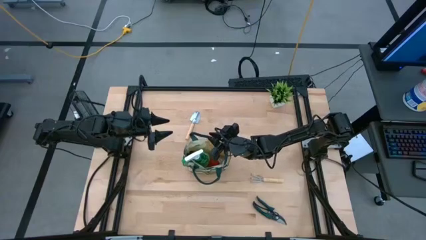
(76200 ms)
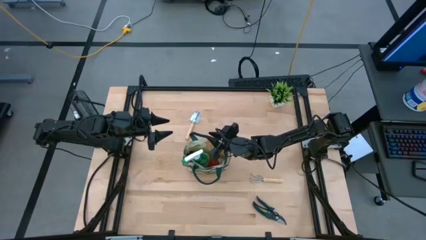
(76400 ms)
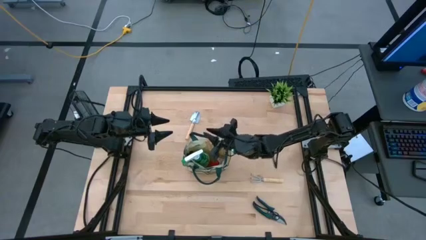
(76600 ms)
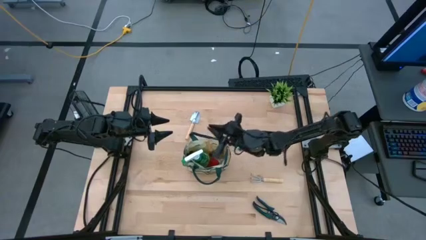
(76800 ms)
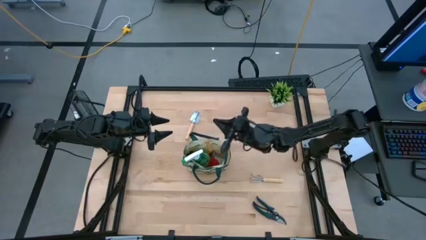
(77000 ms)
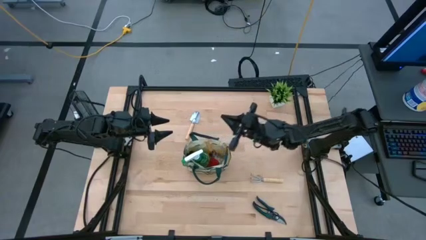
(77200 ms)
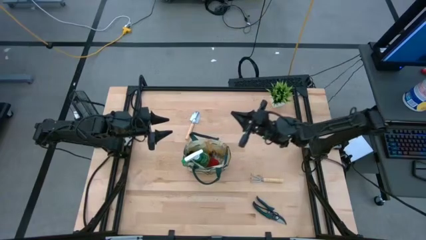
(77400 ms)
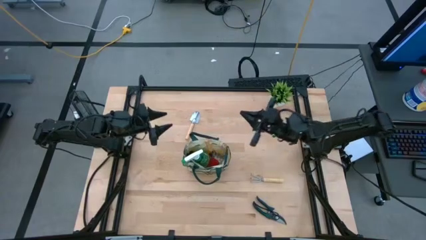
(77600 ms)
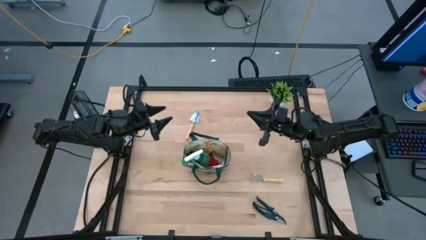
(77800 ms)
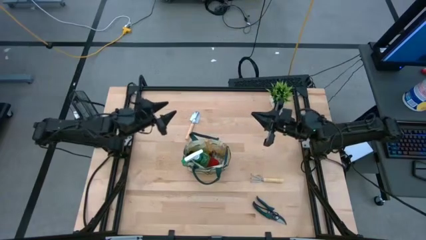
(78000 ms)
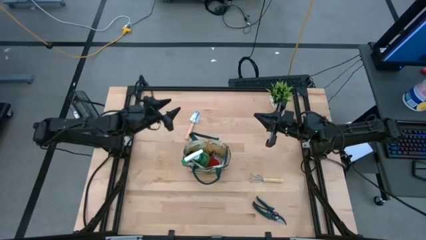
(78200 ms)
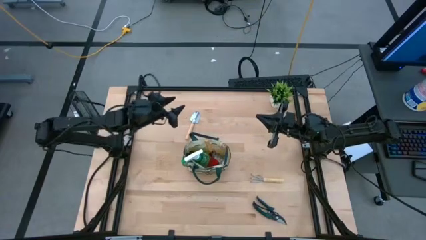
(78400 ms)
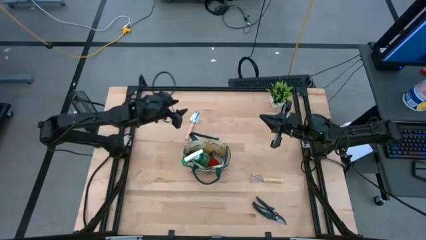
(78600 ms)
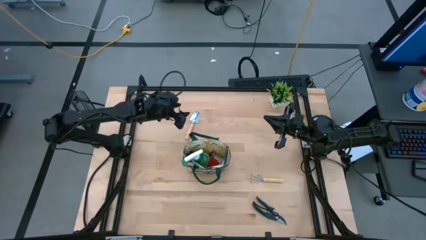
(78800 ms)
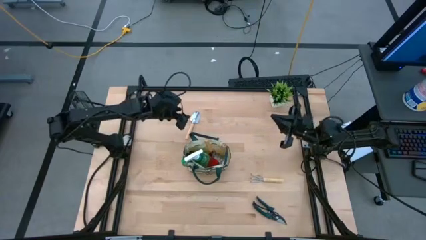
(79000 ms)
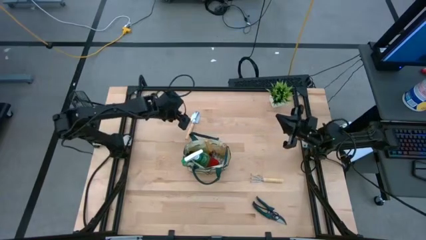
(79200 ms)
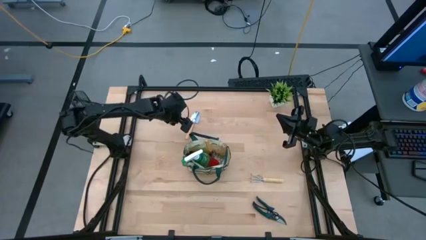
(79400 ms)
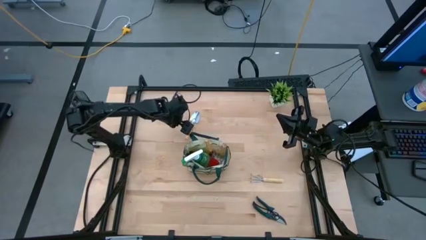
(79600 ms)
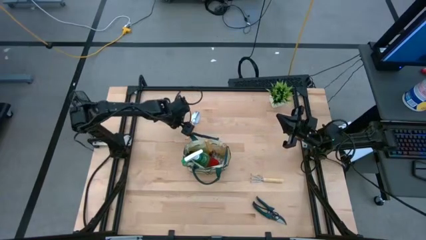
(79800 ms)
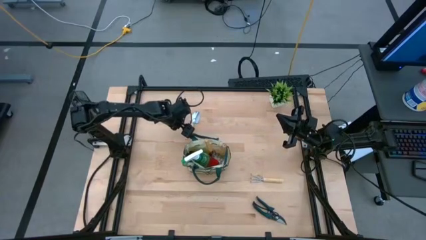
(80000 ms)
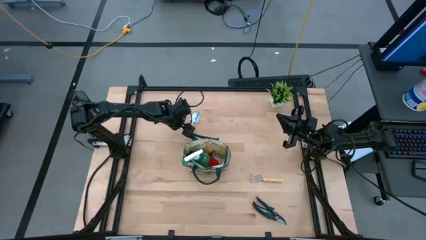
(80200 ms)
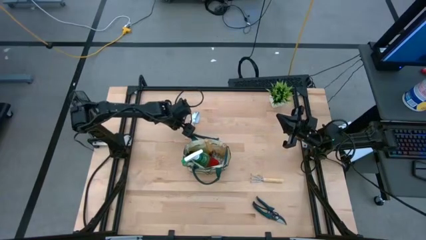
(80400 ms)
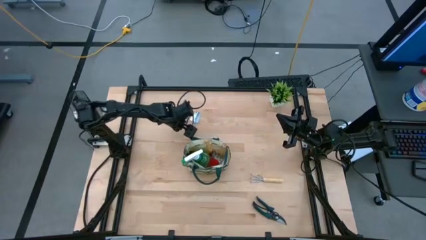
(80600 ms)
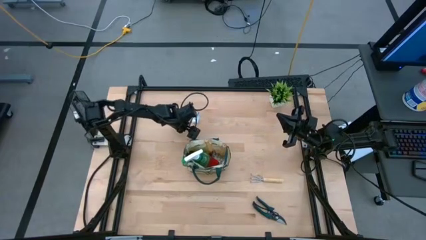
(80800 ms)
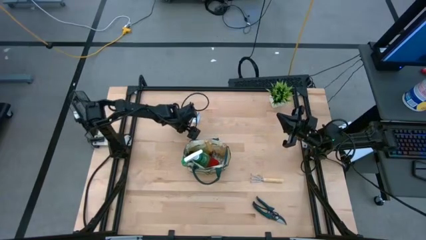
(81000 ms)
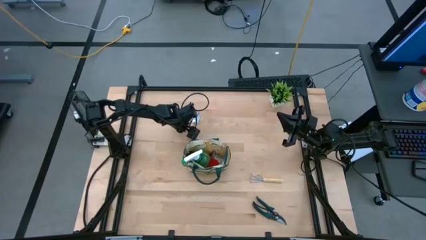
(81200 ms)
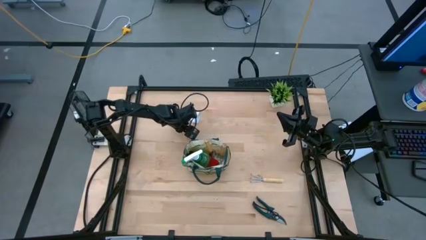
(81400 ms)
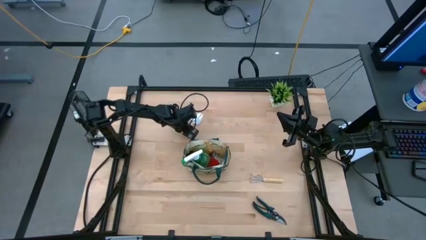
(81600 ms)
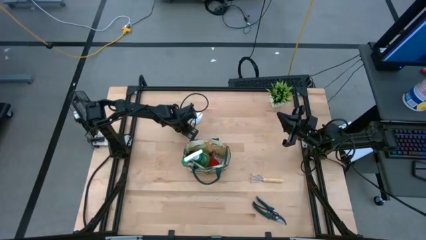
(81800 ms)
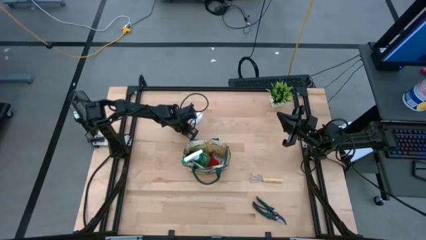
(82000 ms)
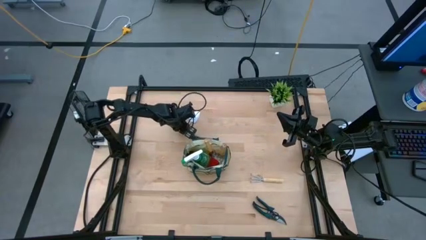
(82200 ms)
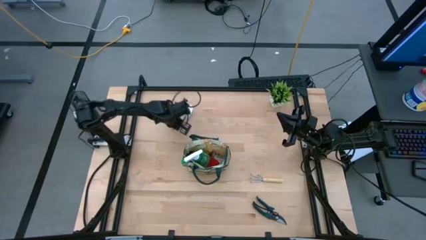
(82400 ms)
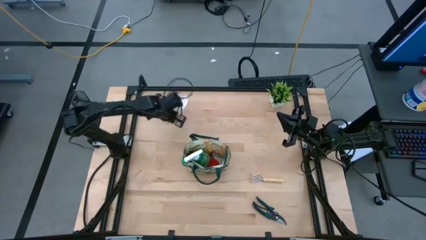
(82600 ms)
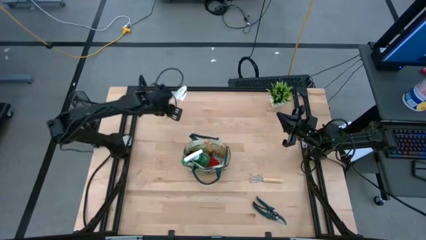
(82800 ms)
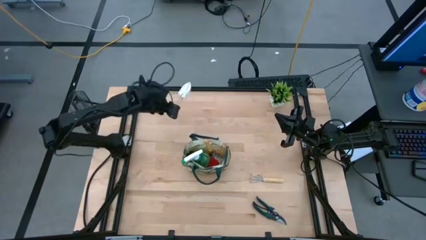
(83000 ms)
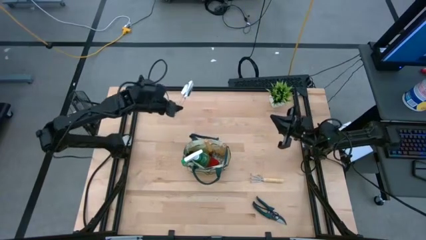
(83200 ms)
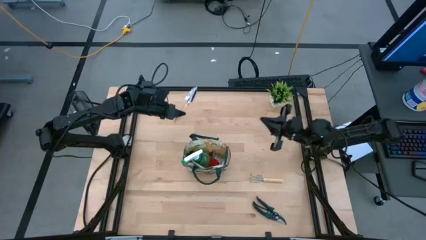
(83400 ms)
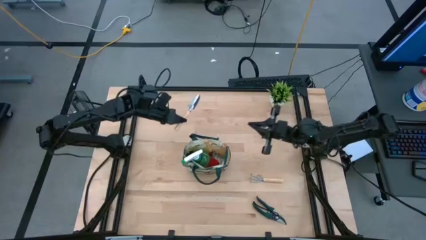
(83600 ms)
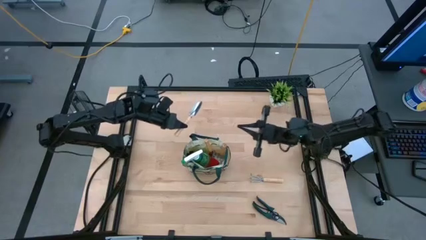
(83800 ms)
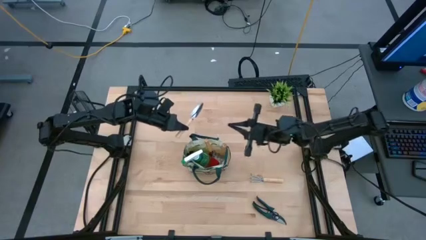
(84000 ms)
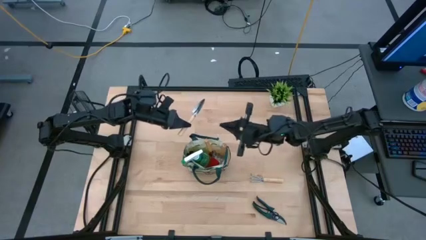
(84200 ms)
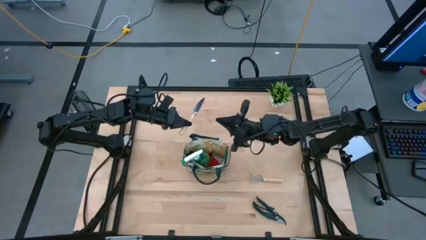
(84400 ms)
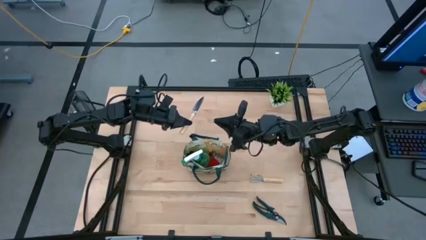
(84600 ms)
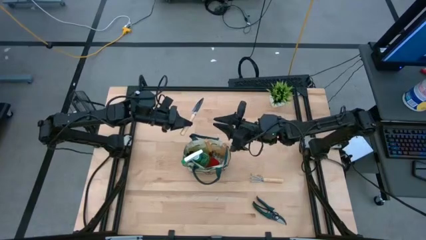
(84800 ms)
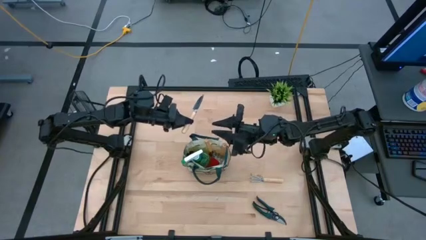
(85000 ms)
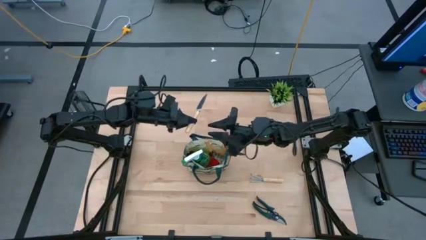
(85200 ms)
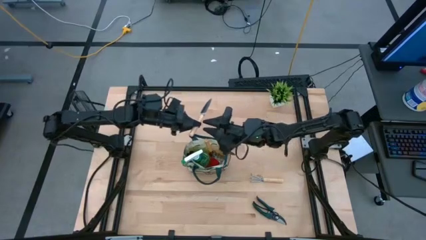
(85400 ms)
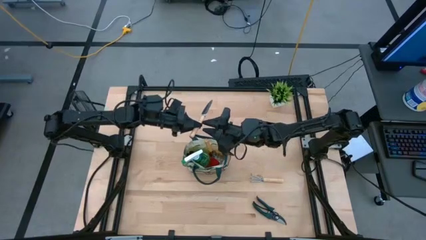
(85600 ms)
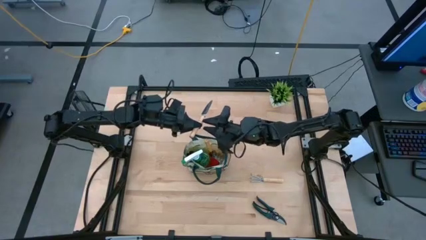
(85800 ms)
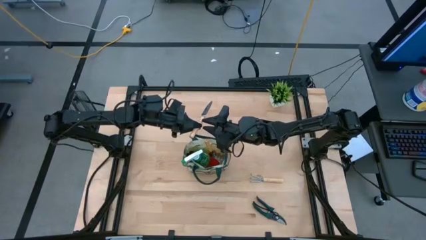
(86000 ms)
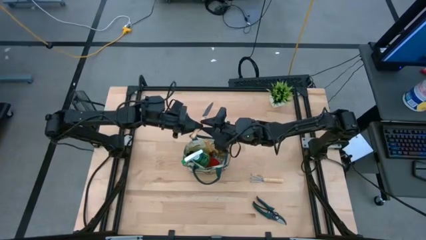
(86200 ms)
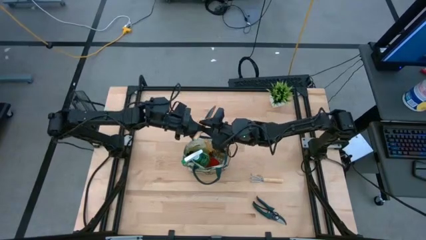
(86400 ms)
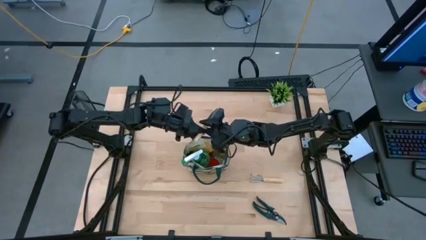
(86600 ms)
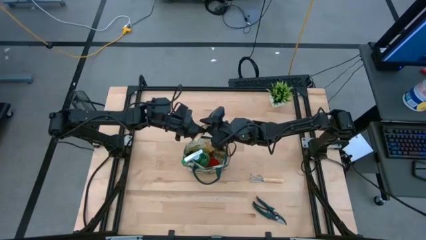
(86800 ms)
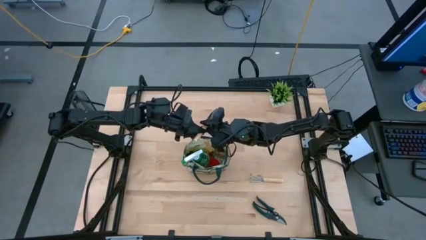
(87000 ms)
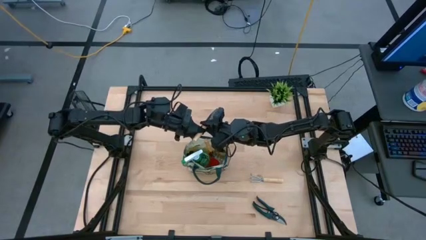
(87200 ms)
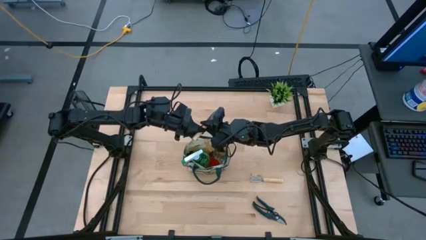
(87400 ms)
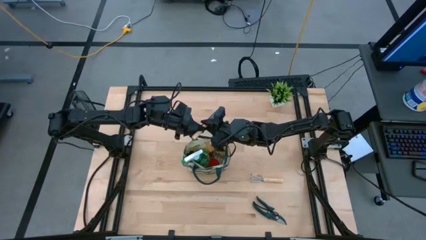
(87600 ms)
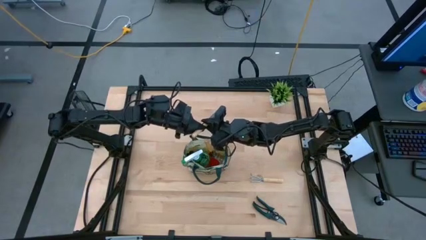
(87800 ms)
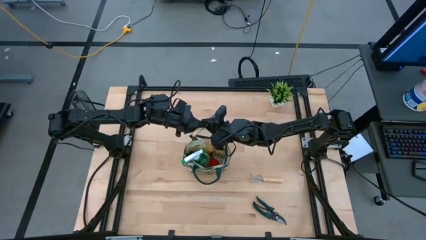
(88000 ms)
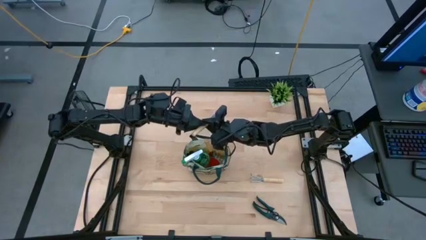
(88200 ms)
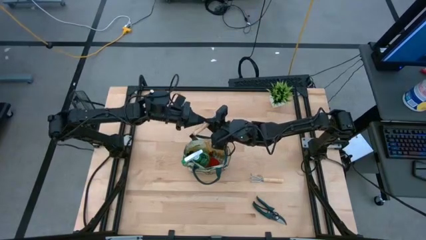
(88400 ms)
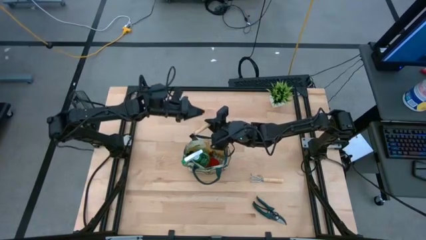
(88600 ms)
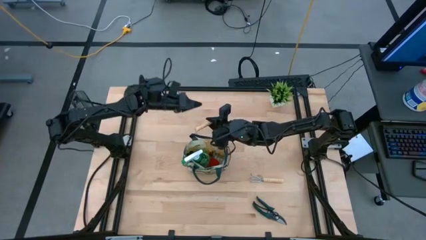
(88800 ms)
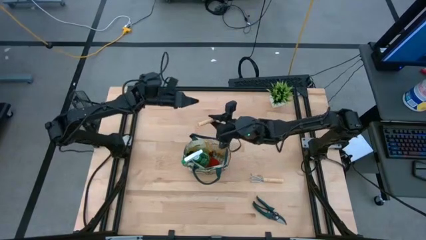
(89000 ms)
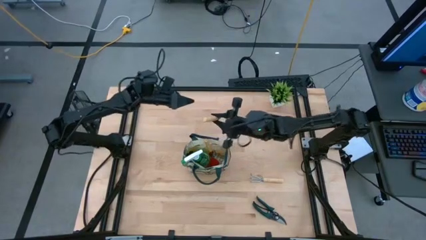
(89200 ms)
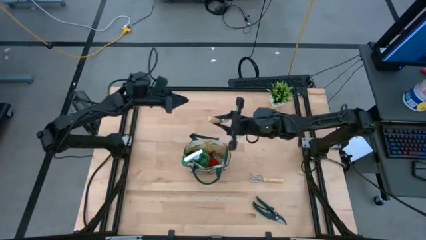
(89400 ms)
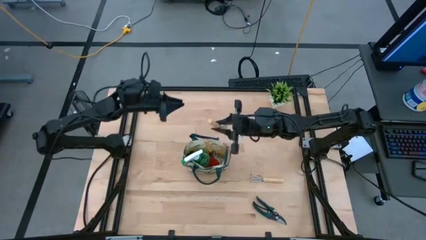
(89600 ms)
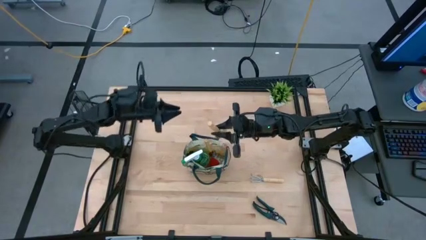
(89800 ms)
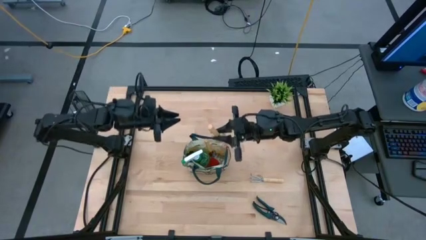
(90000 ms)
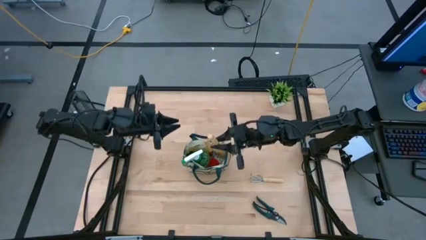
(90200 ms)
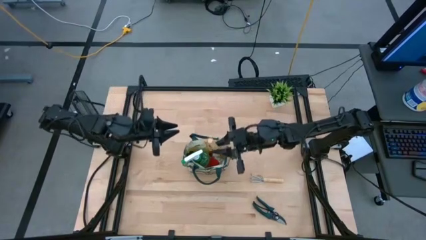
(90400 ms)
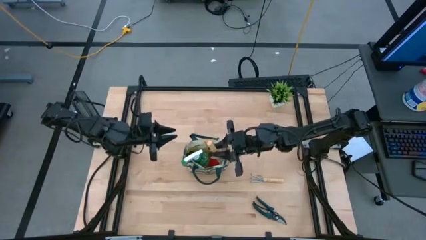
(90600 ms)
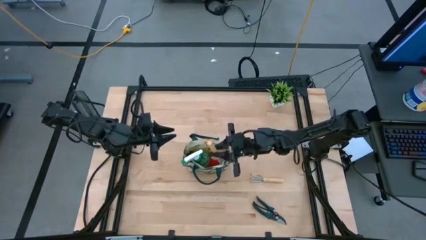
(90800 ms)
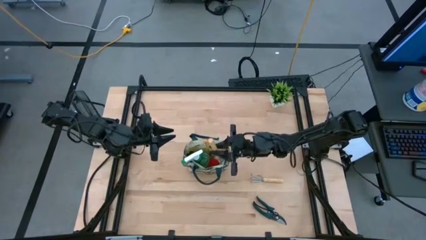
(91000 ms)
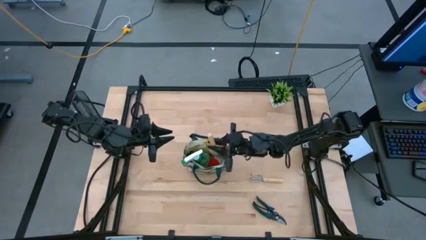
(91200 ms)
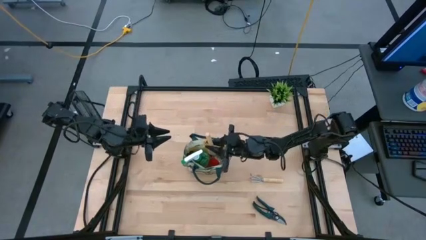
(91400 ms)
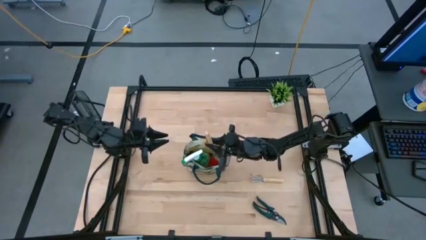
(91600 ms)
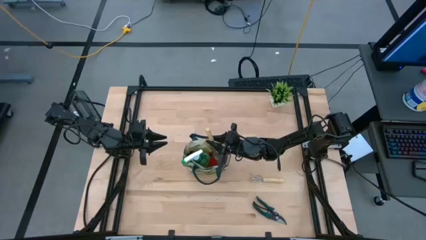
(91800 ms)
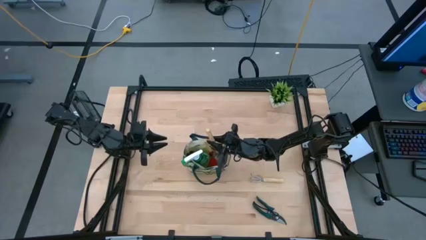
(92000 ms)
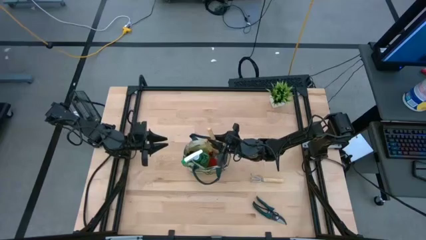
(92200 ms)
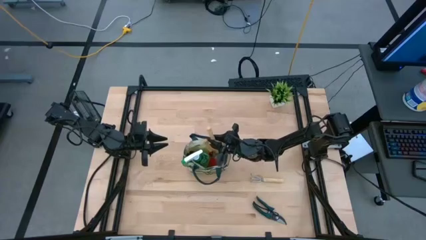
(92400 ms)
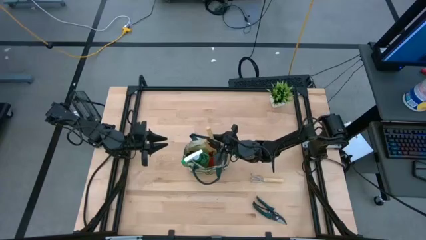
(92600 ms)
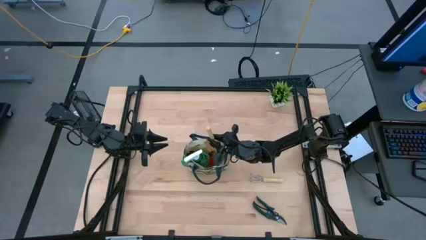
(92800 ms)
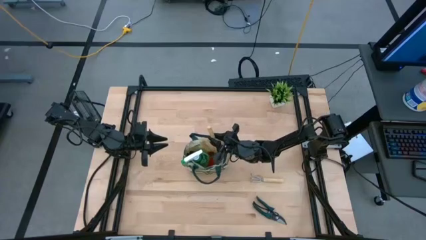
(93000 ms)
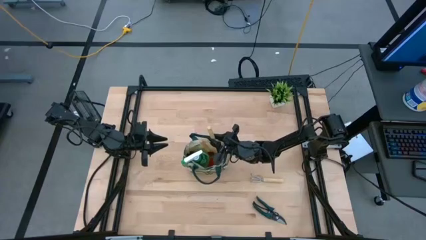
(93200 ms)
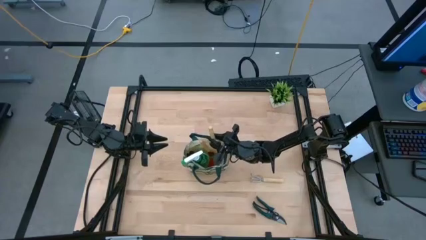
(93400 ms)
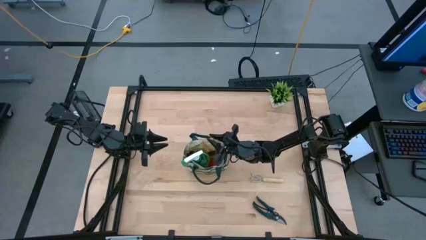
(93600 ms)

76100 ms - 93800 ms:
Task: Pick & Place Garden tools in Gardening bag
Put the brown trowel into the white gardening bag
